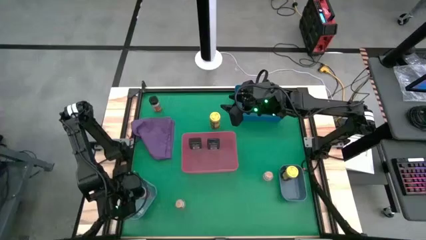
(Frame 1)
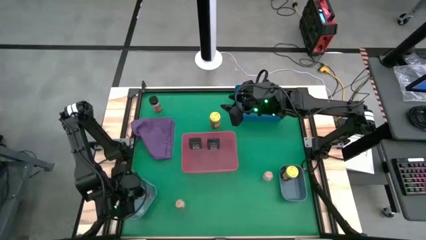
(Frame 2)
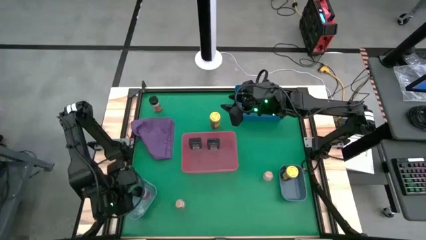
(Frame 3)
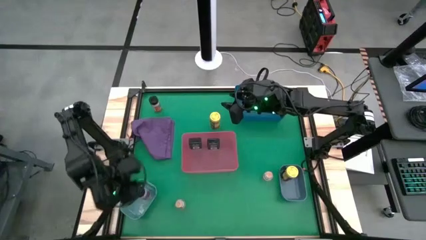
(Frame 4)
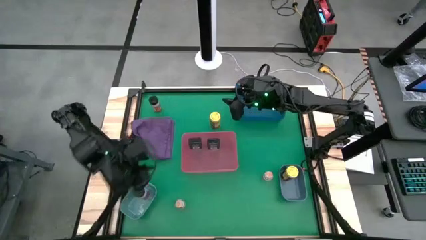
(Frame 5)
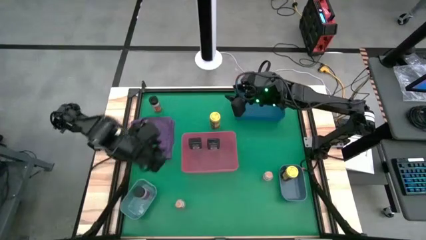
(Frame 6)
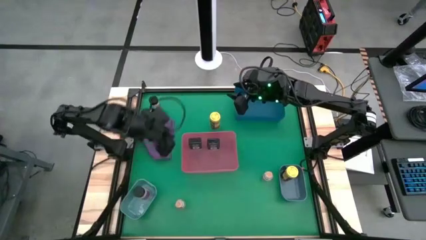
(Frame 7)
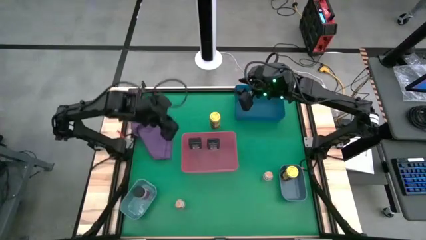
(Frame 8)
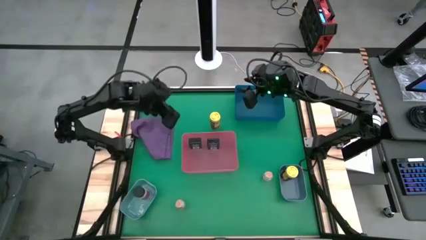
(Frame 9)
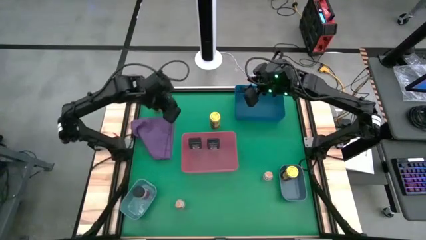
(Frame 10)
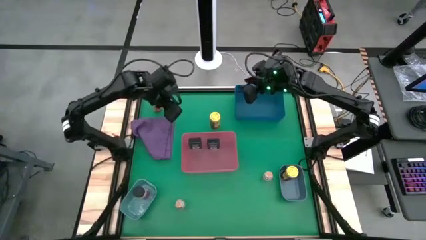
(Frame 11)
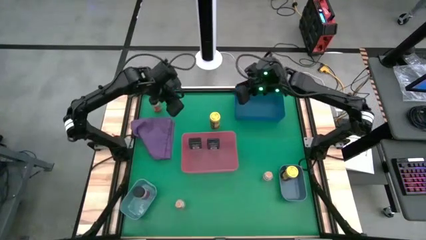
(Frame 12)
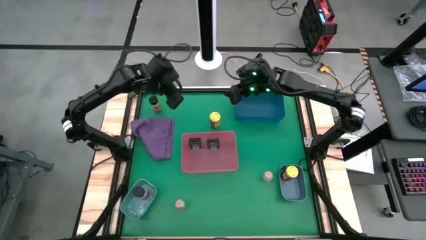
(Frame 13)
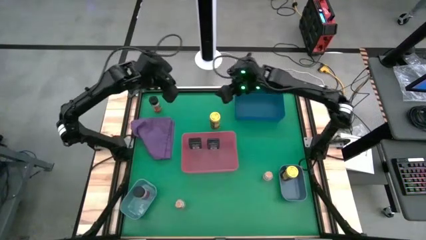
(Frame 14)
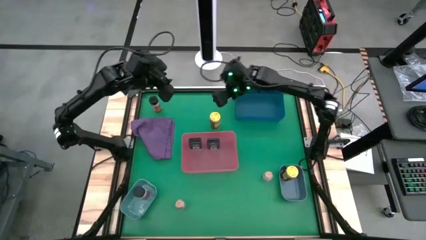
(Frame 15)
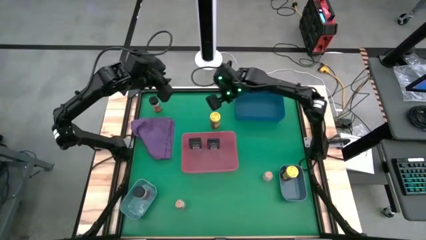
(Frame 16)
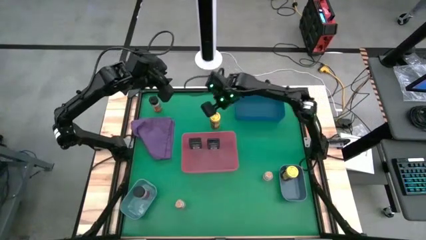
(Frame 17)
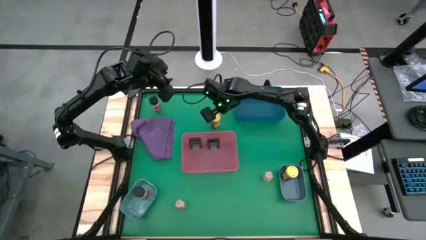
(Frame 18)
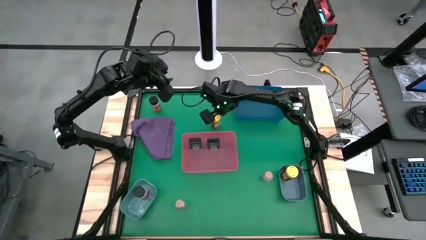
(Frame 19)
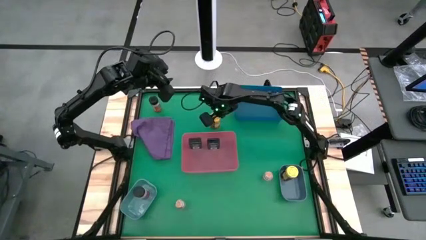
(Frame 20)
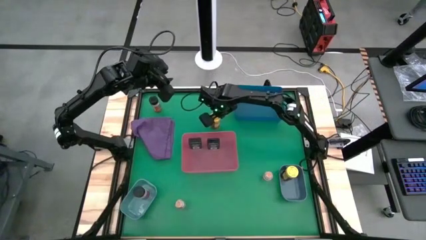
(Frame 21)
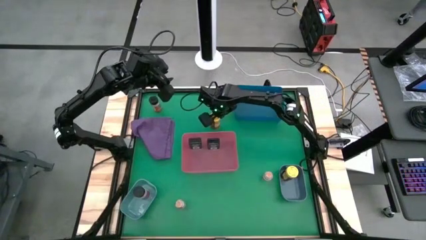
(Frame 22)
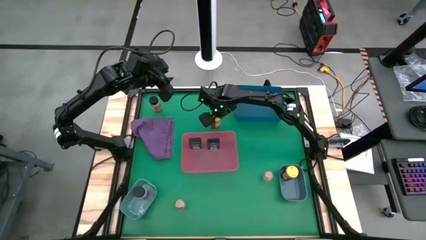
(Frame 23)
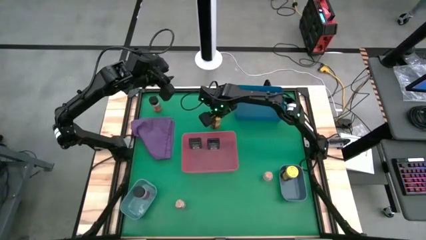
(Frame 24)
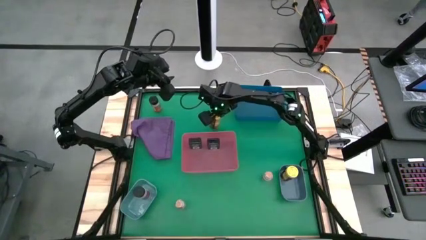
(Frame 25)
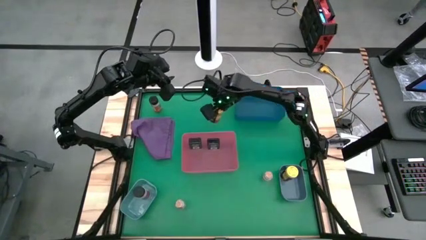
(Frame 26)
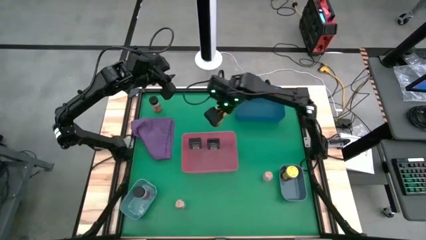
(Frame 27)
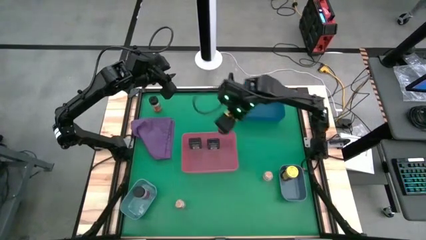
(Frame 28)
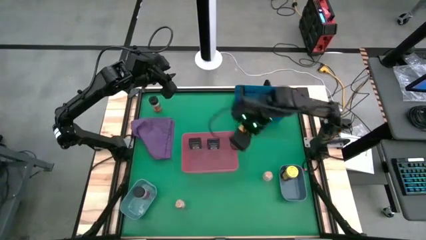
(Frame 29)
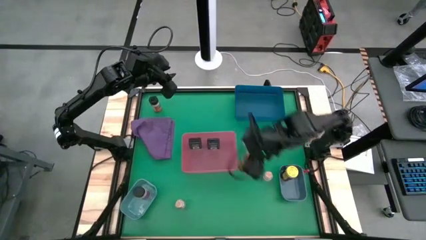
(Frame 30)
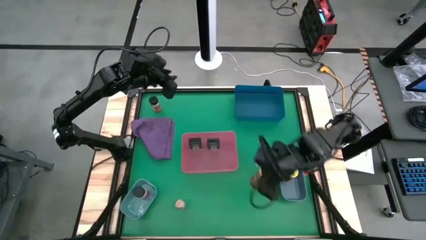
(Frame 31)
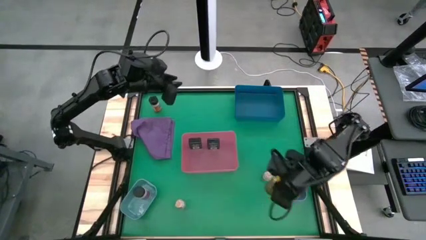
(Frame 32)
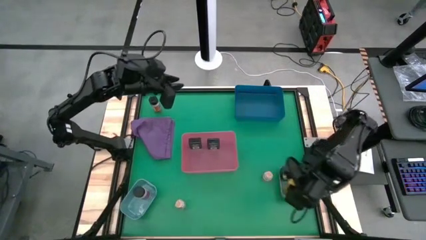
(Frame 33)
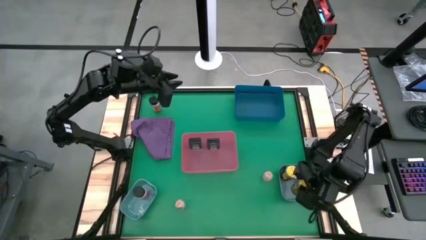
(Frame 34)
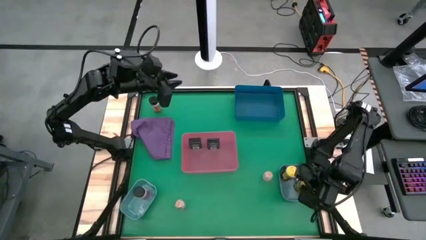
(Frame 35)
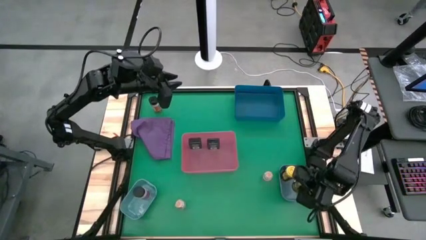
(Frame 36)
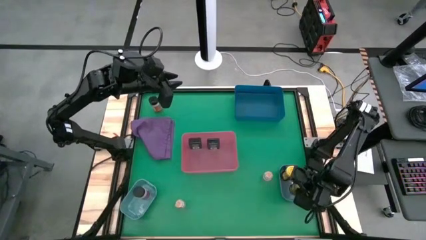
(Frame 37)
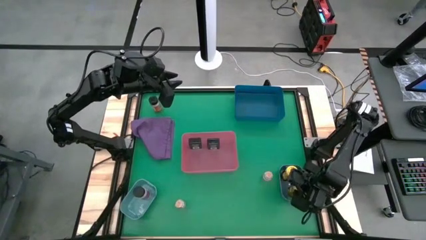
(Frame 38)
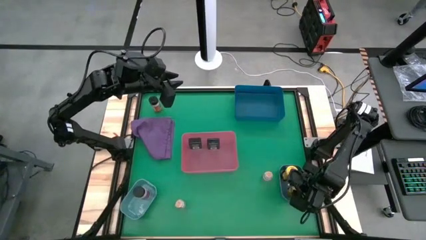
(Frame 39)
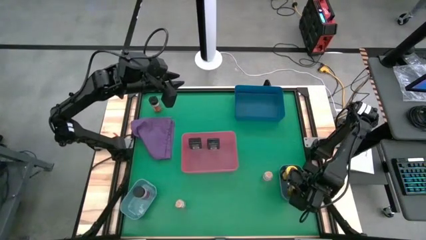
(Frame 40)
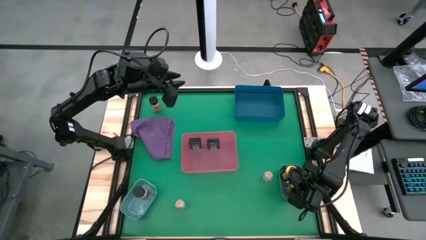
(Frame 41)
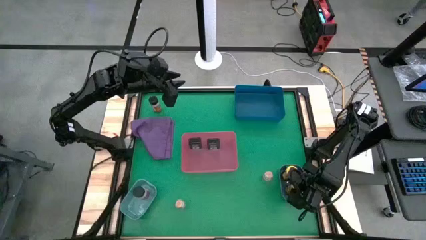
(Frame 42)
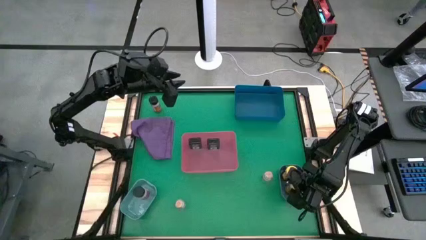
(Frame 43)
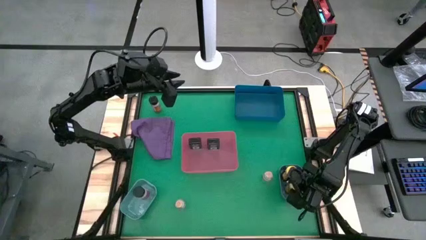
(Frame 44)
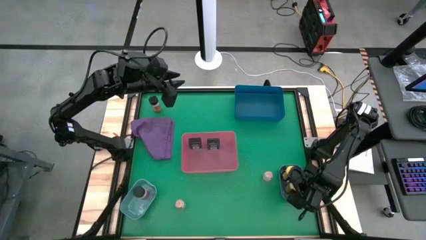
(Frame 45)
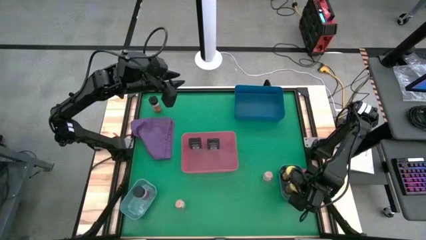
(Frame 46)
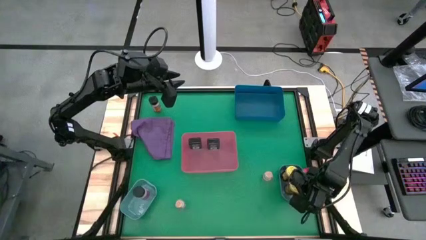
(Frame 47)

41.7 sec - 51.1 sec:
Task: Sort spices by type
Put the yellow seasoning bottle into the gray bin

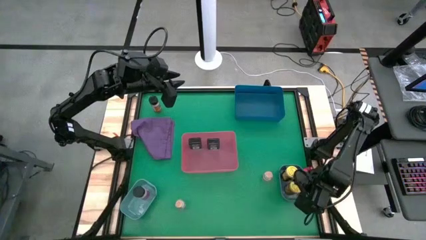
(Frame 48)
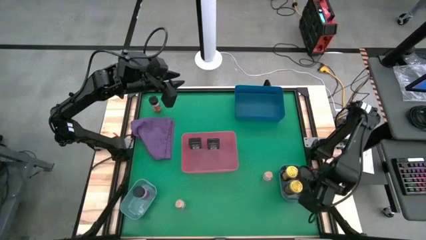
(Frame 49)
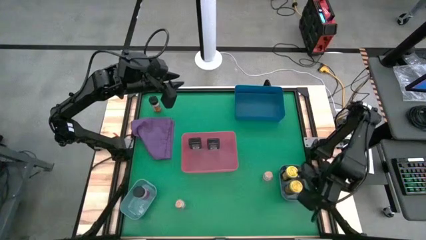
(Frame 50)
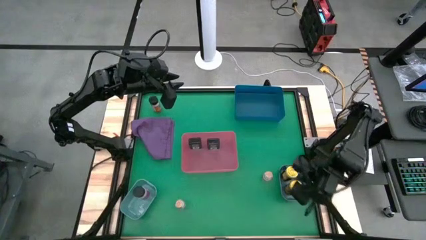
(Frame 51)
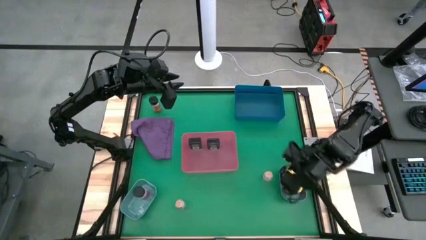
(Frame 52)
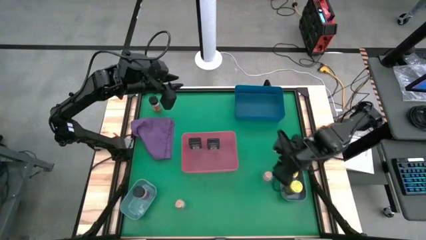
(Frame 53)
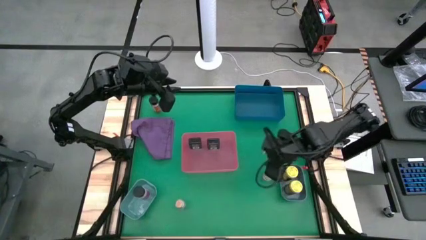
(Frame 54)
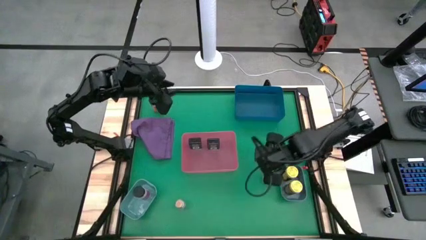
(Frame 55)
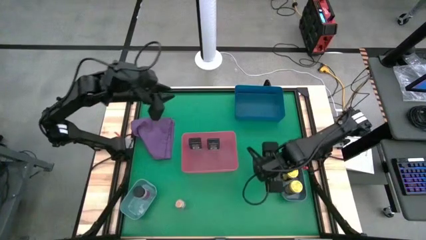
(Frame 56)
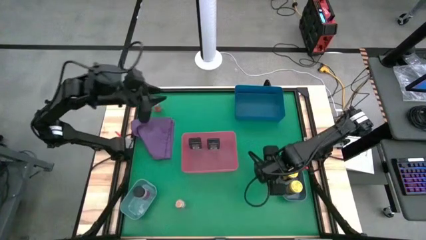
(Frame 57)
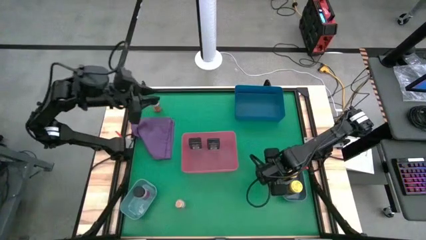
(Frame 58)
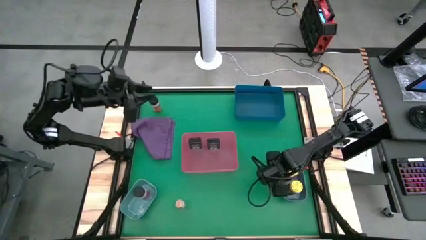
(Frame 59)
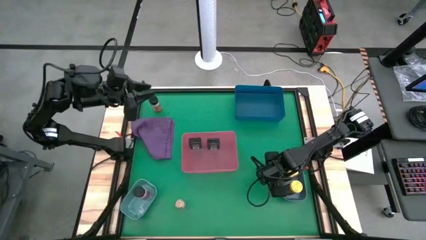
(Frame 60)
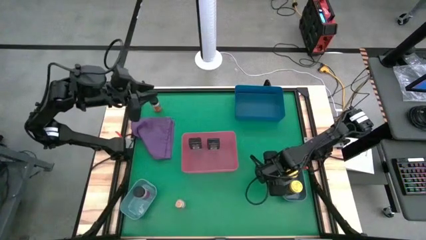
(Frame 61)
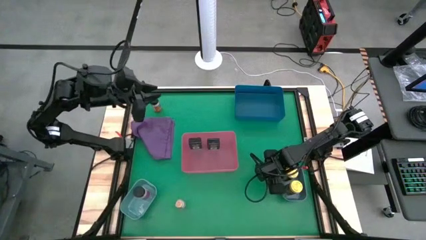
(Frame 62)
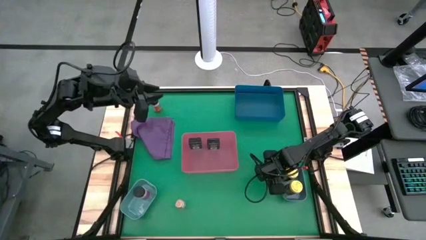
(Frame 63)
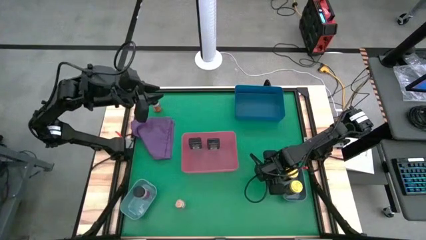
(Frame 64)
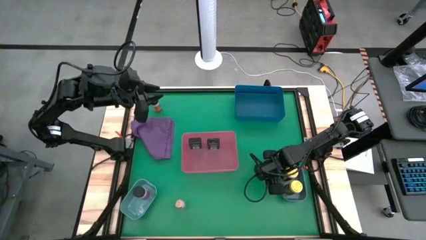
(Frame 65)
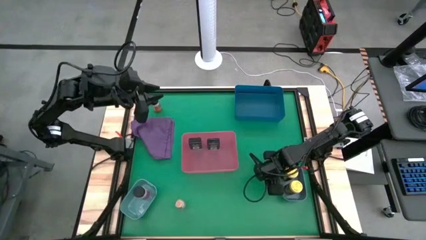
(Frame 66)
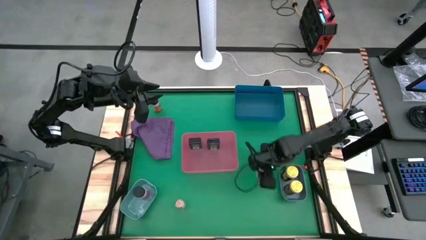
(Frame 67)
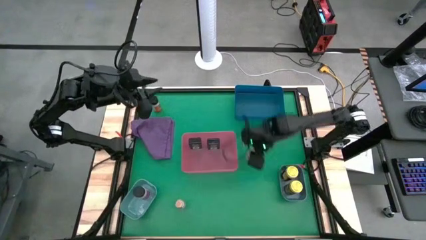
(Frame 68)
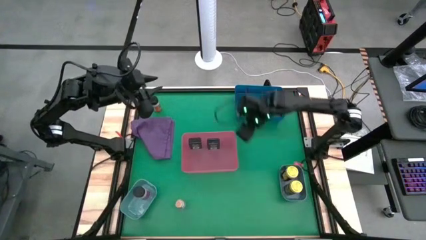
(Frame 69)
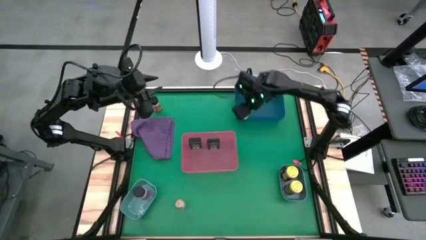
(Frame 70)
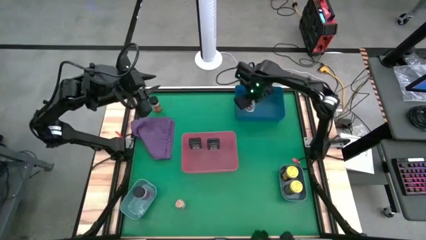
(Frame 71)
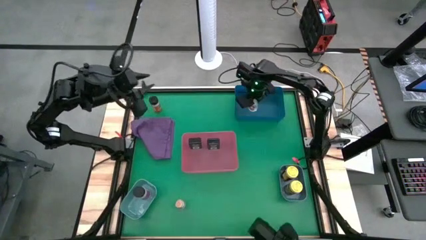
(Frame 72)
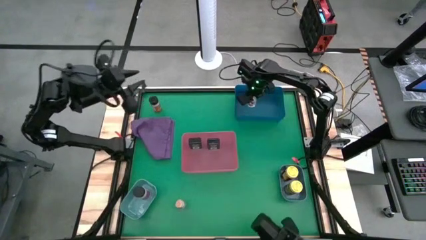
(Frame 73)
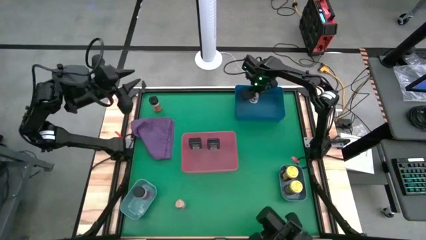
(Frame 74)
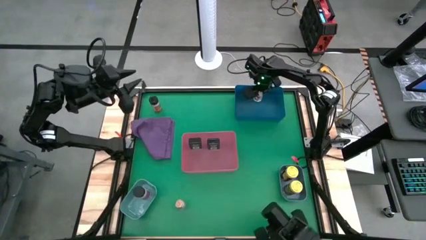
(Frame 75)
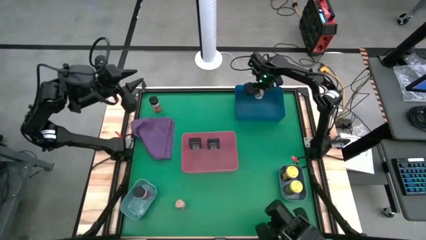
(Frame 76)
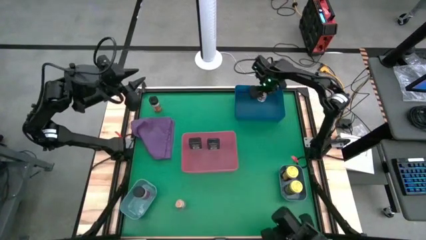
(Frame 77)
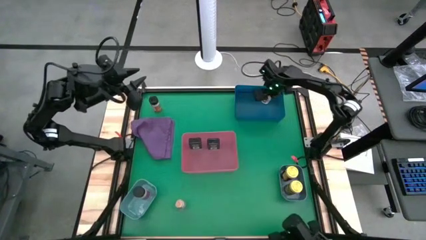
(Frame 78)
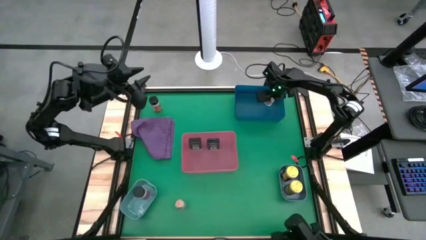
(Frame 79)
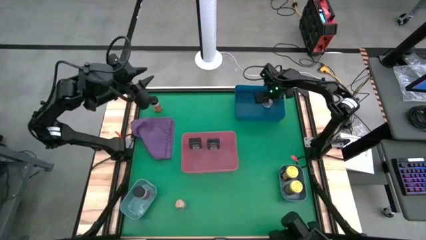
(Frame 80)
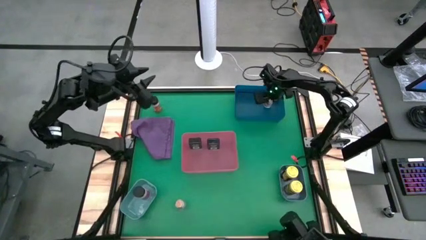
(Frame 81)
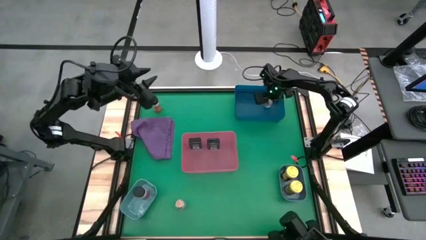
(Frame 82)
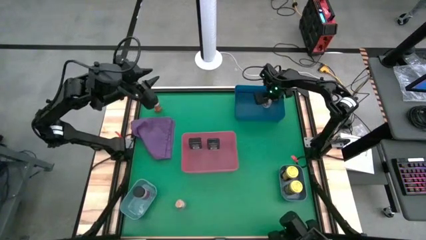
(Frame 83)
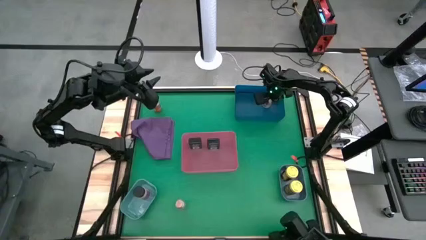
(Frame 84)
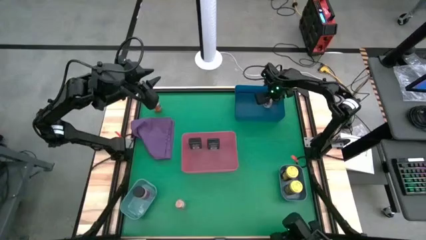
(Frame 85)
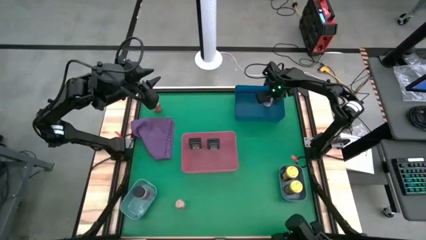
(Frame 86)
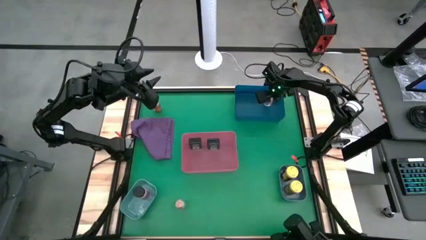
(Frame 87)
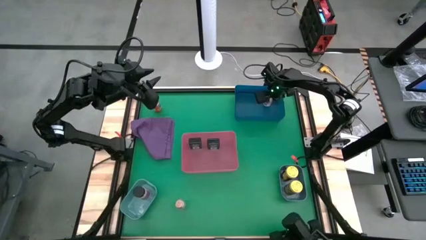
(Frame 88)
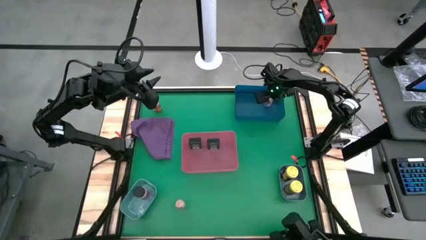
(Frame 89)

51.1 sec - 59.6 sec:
Put the right brown seasoning bottle into the blue bin
